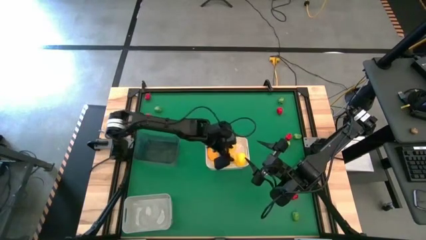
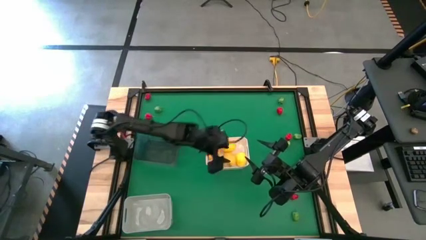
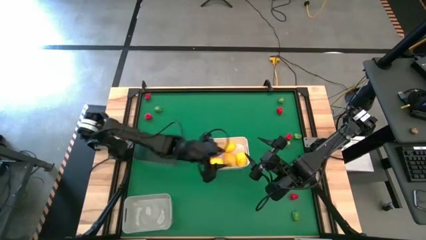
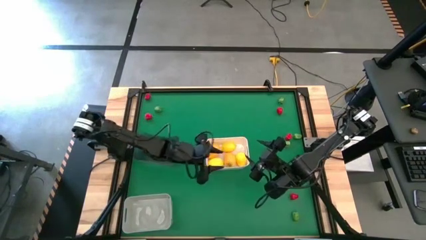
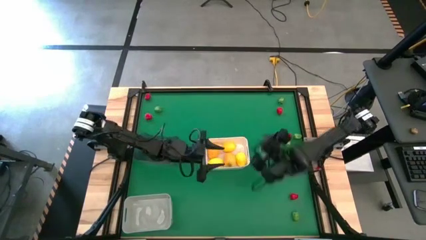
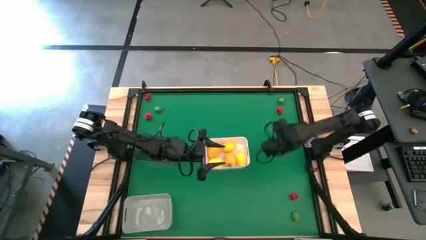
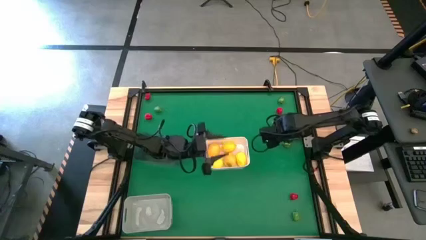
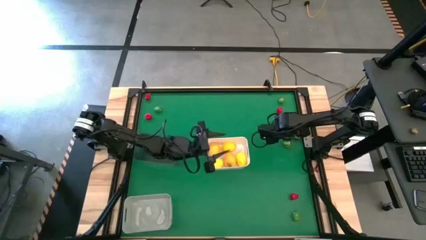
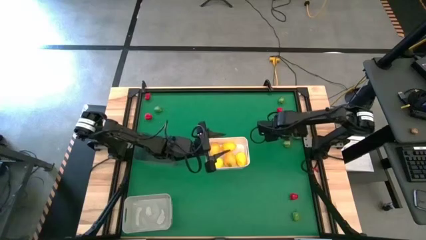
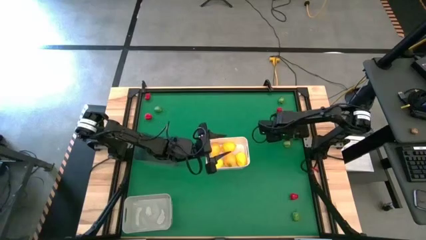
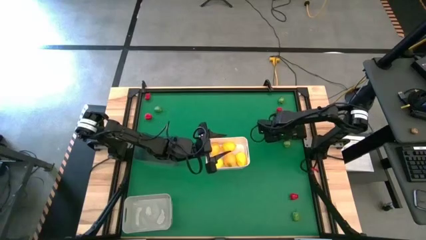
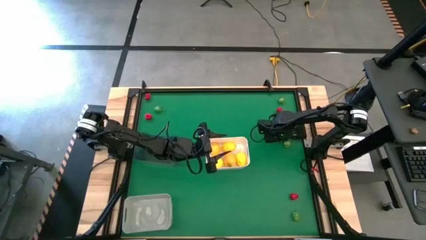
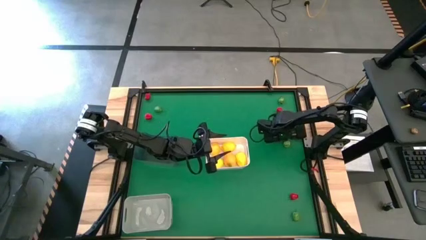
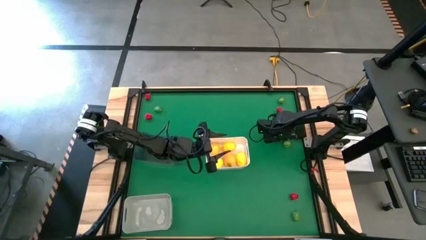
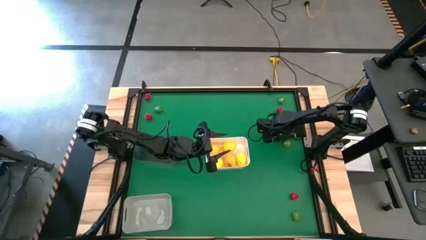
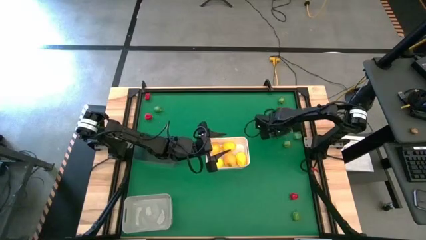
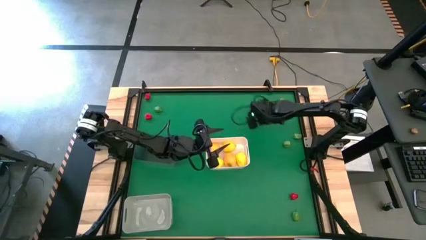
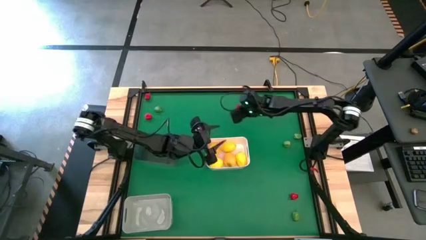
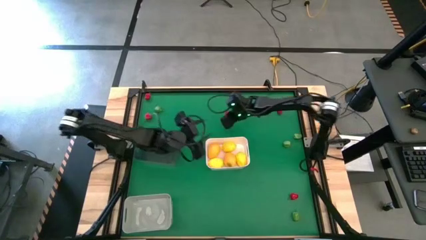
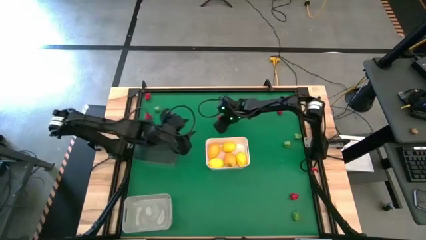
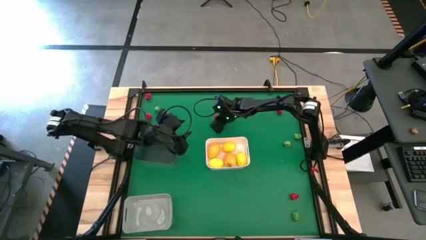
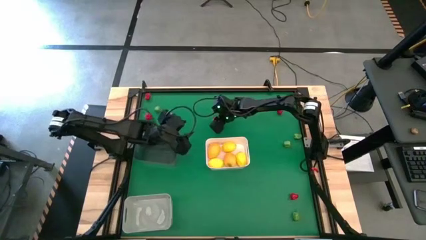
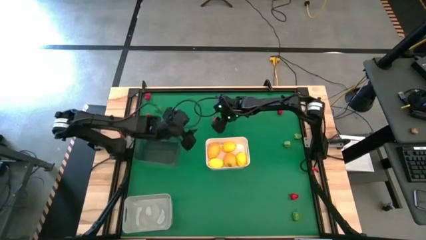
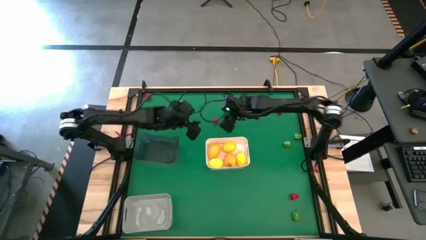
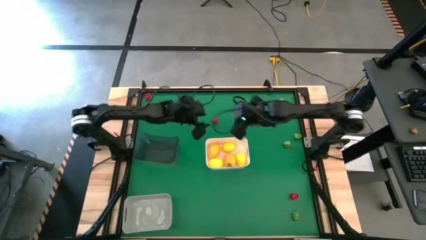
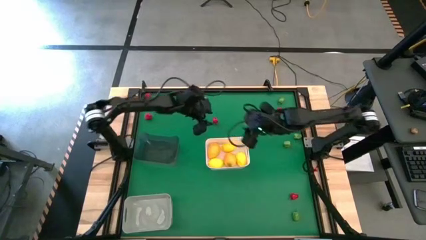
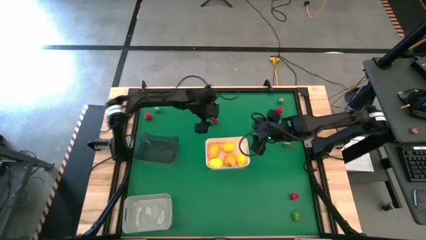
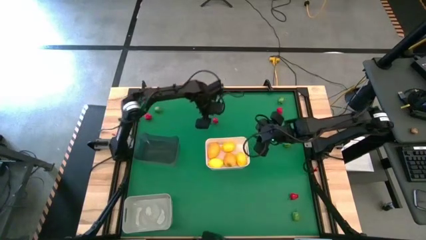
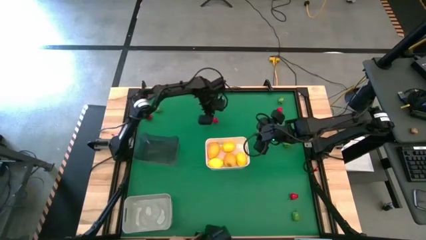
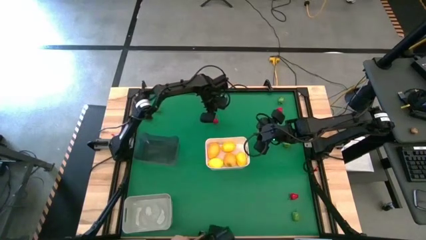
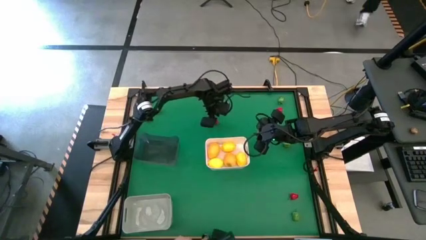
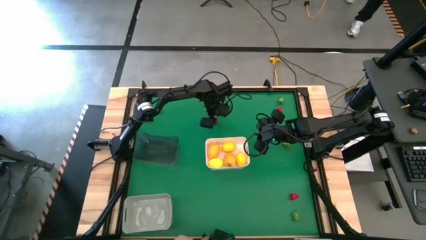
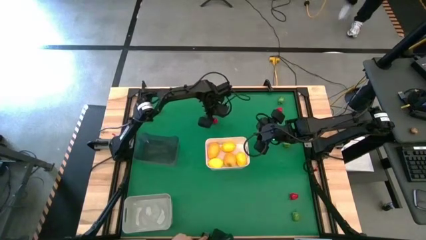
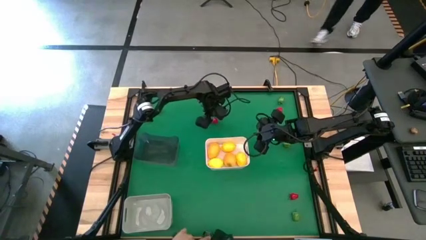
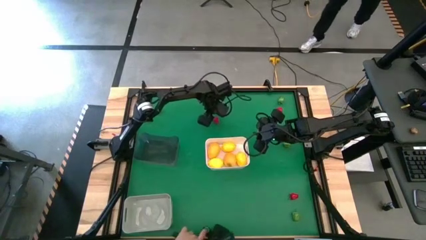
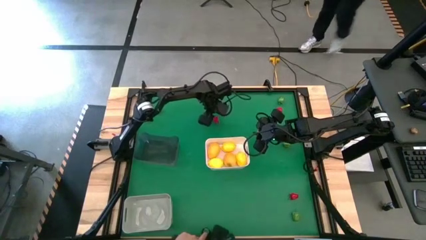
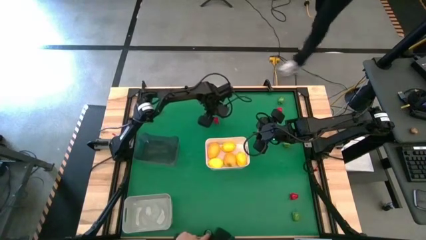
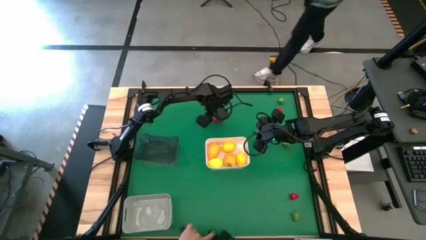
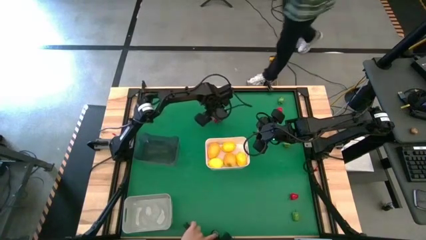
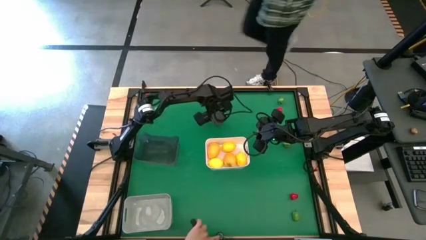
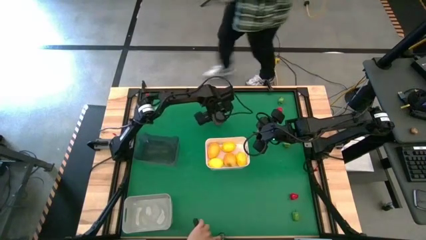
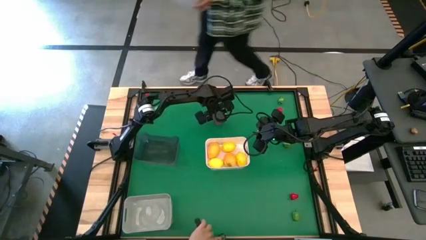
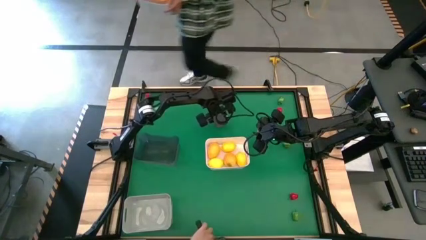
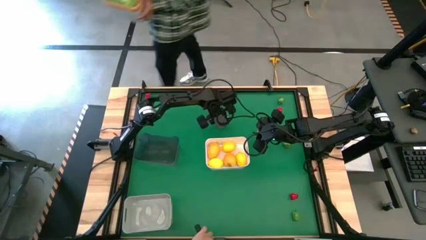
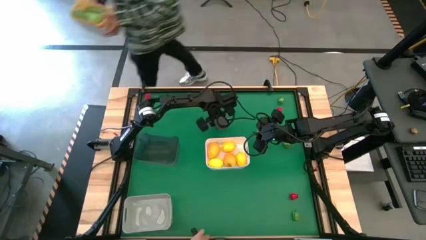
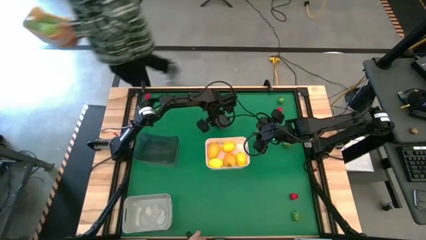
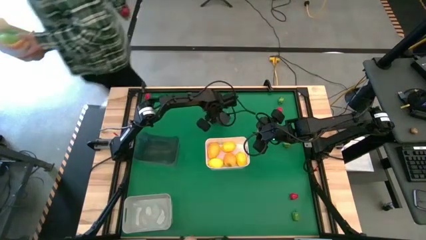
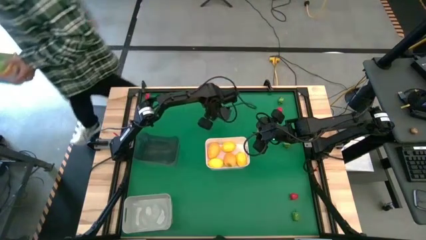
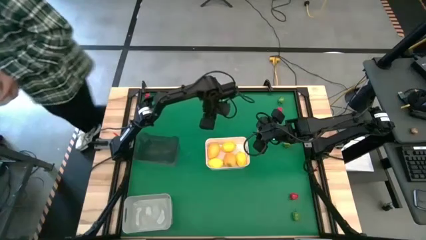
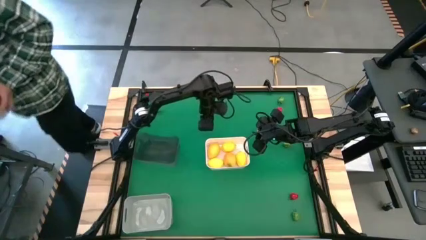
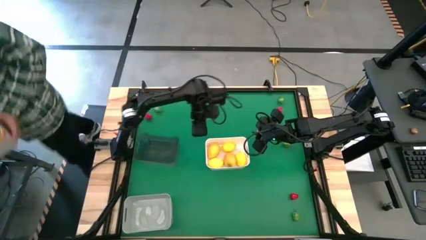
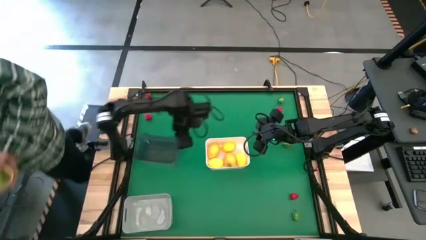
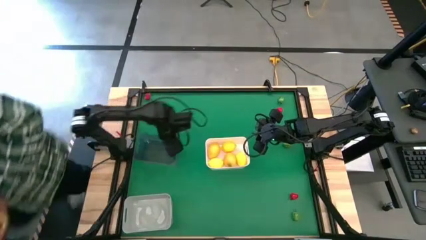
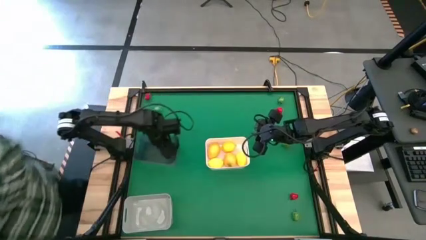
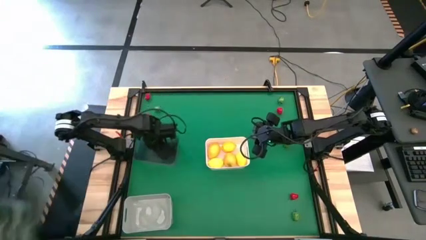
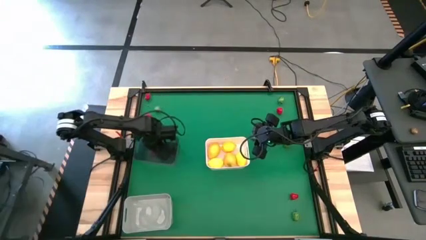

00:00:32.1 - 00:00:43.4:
Task: Sort produce into baskets
Put the red chili pepper into the black bin

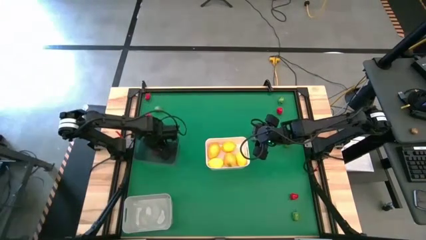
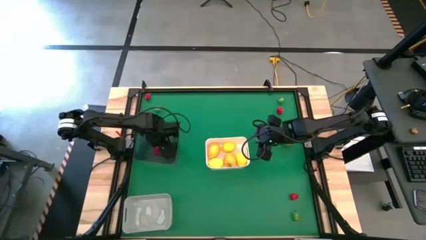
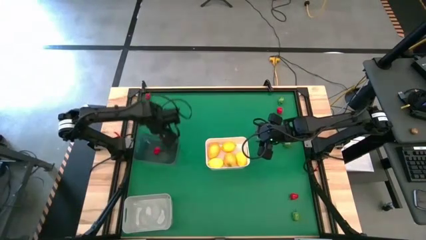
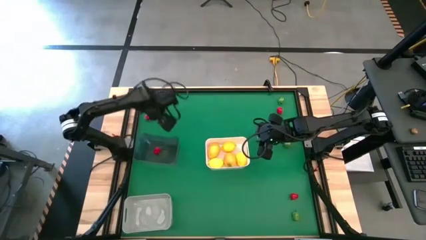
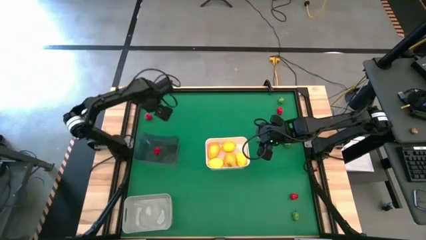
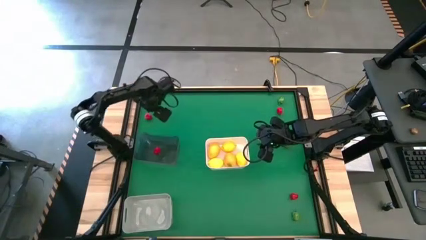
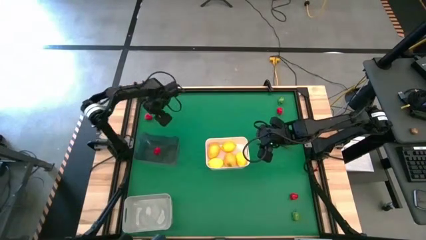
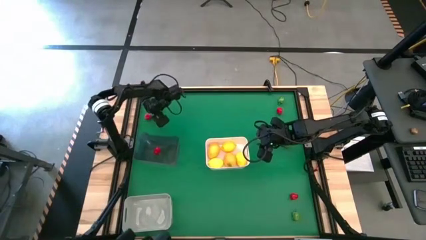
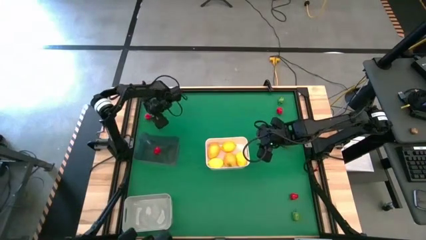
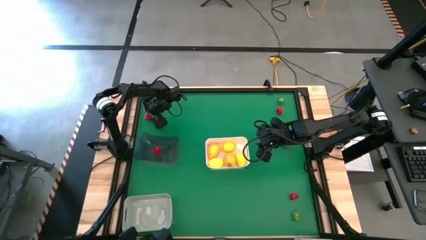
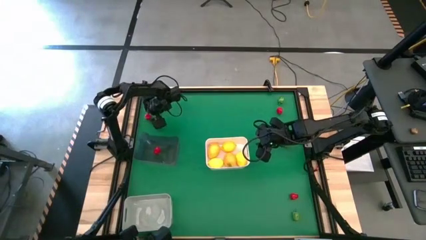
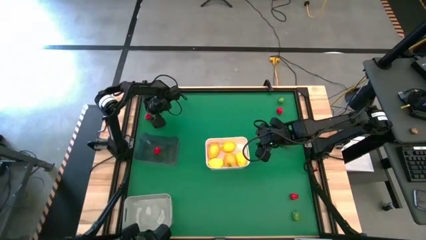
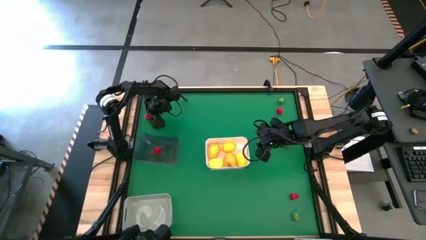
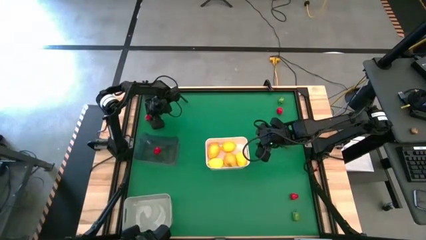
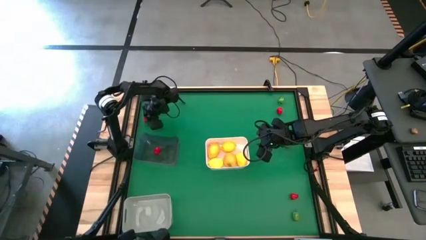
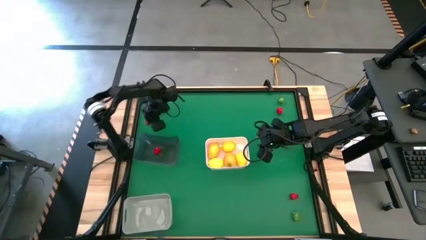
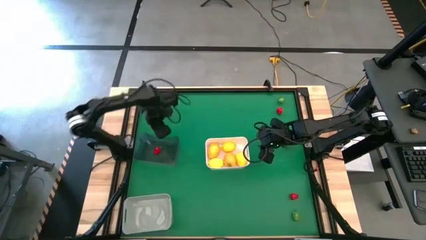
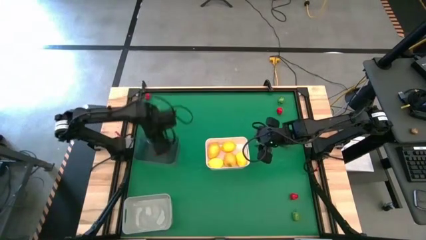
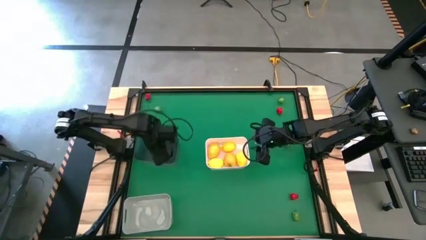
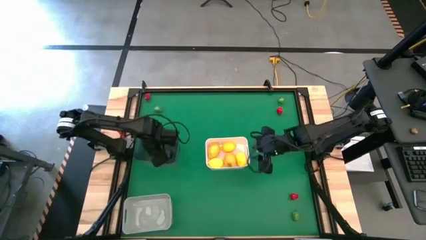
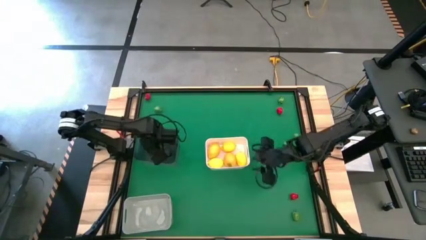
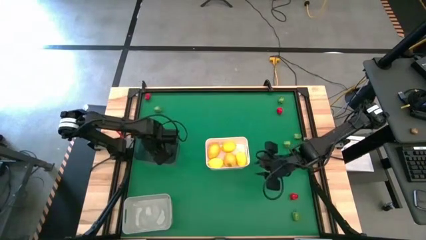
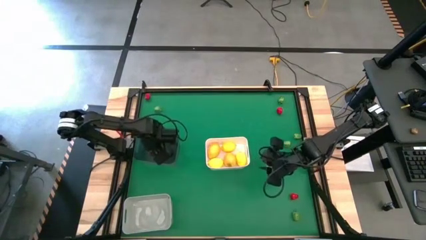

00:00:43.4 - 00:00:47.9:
Put the red chili pepper into the black bin

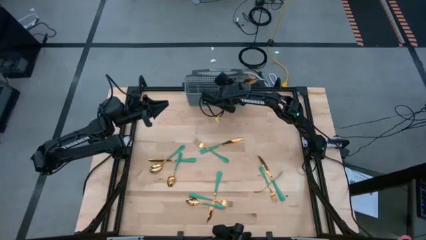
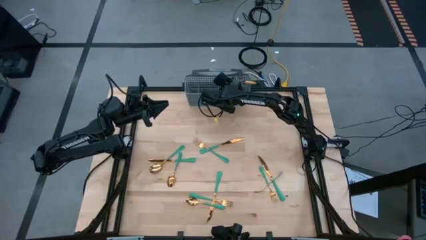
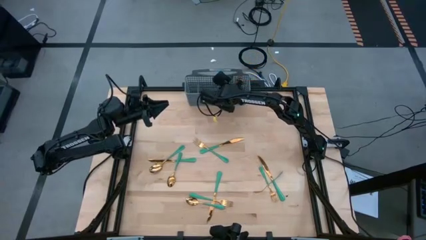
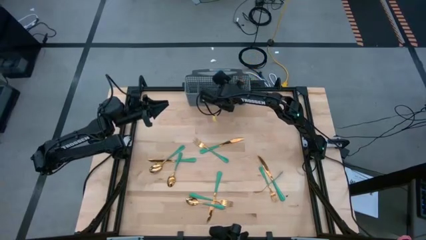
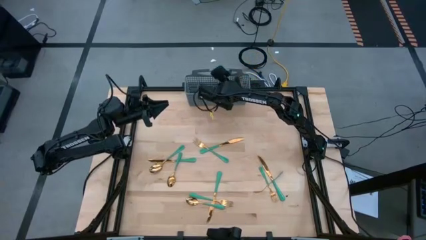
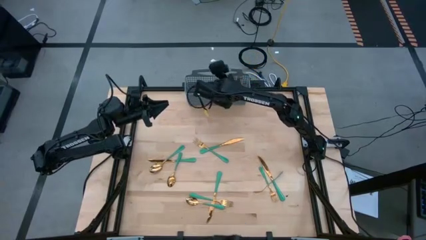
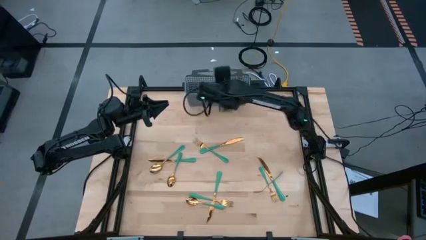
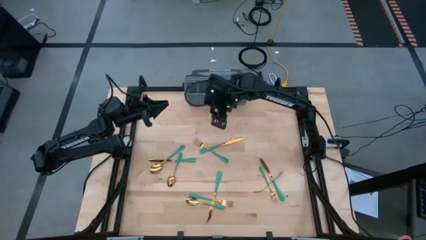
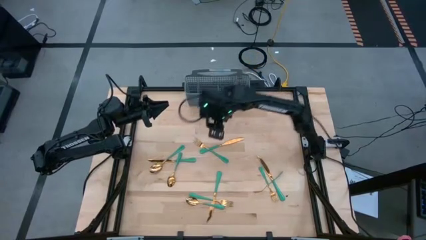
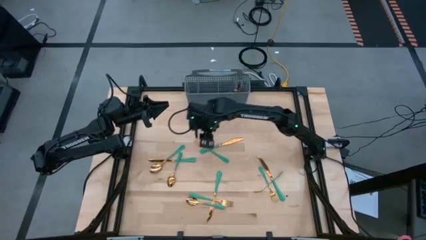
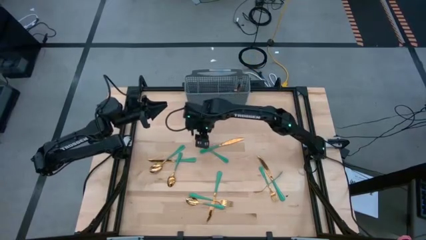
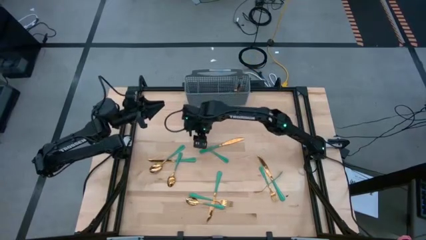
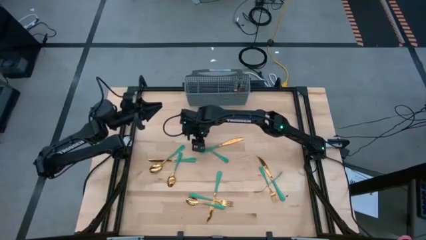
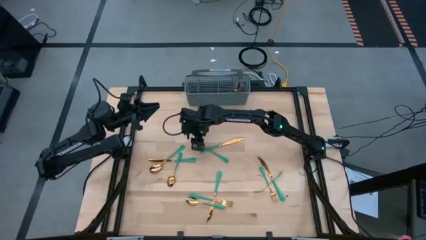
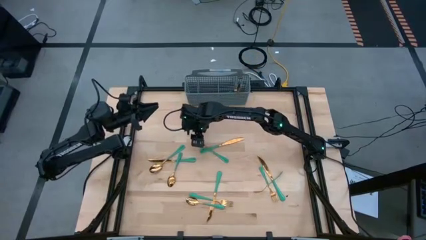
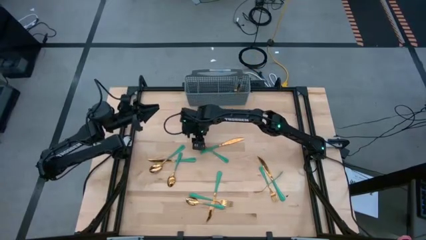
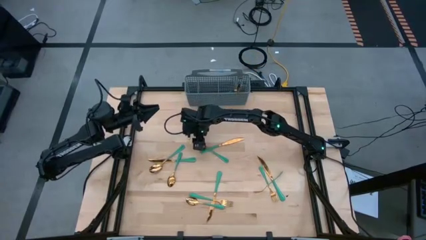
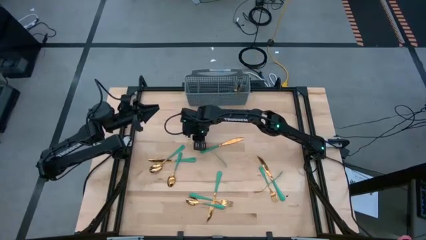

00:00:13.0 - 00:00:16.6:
Task: Sort silverware
Put the green fork into the gray silverware organizer
